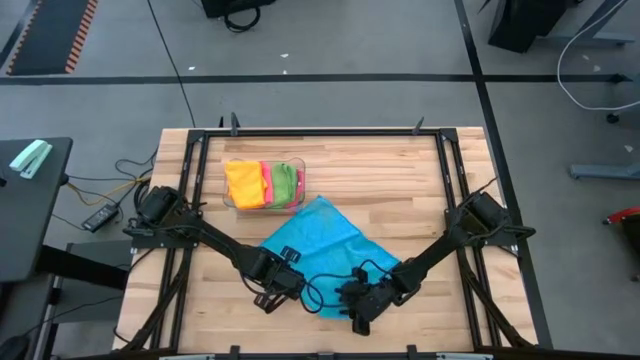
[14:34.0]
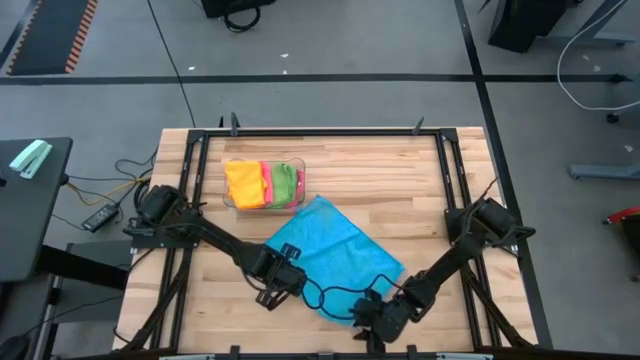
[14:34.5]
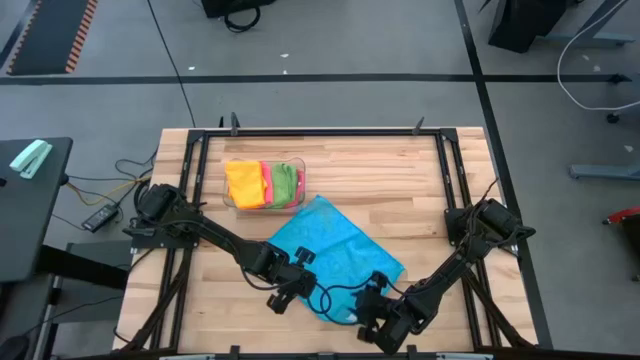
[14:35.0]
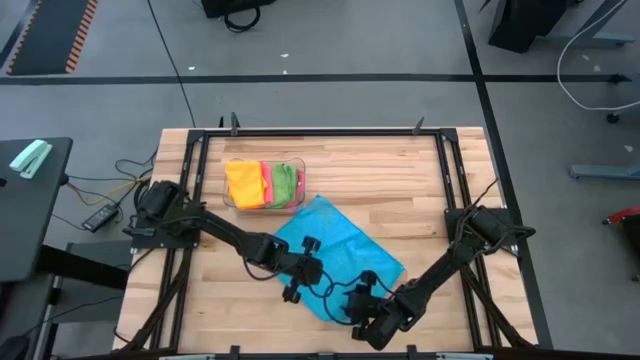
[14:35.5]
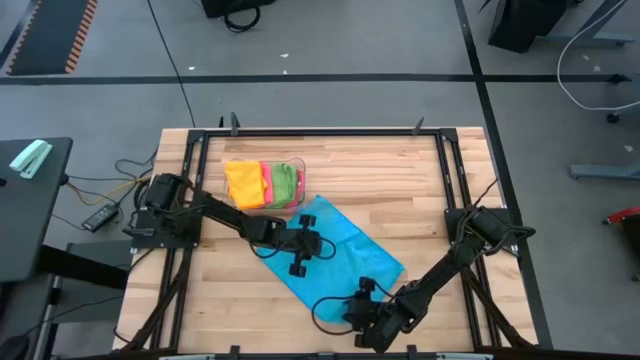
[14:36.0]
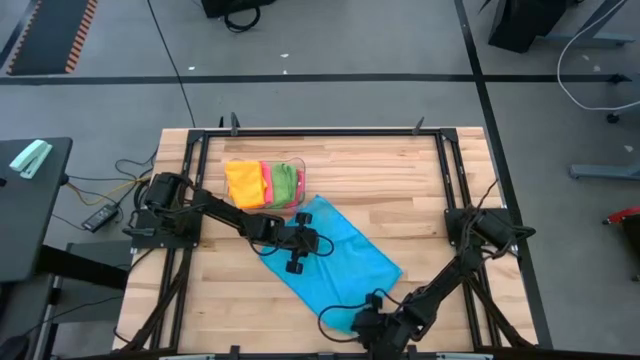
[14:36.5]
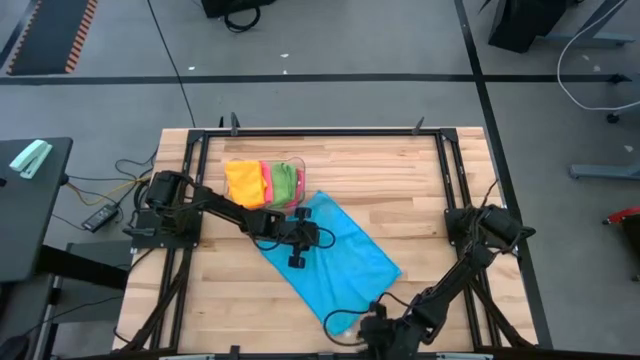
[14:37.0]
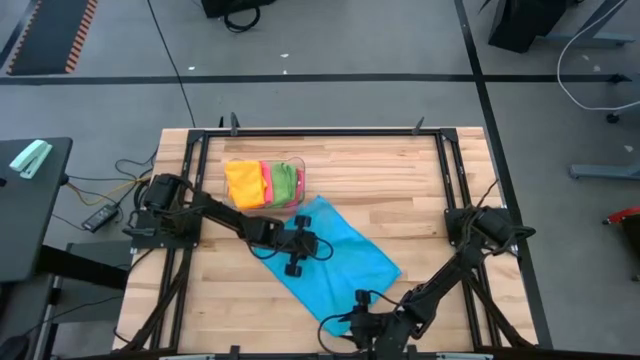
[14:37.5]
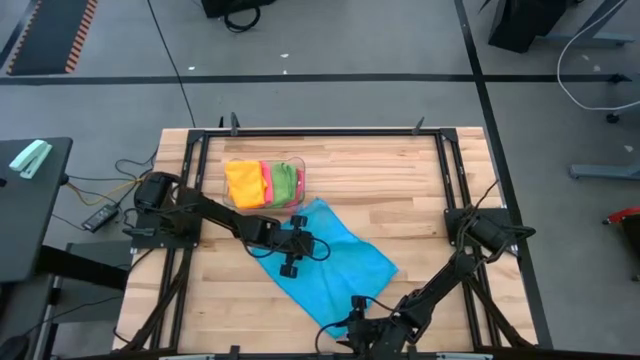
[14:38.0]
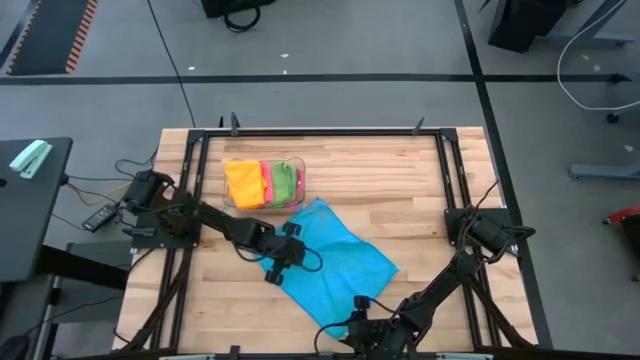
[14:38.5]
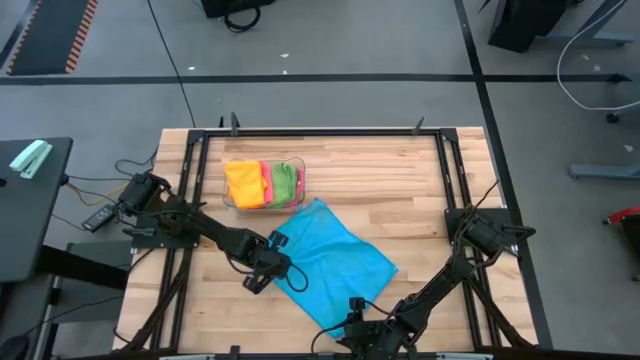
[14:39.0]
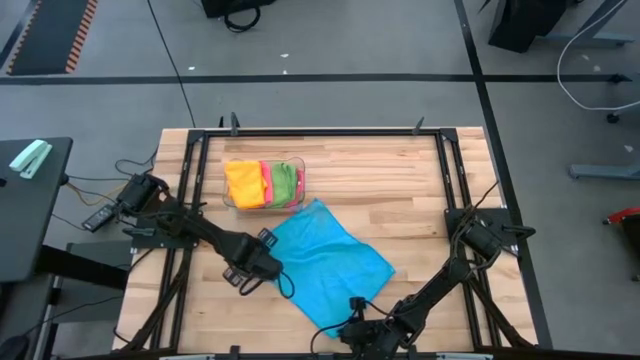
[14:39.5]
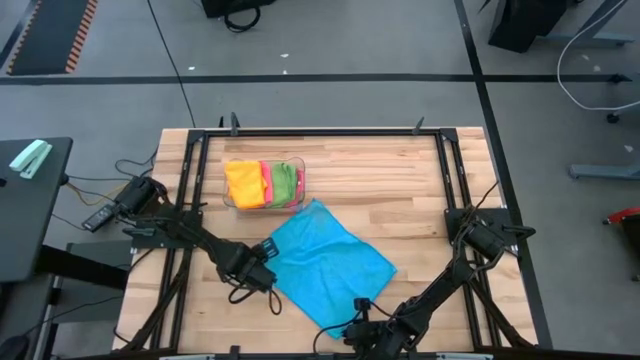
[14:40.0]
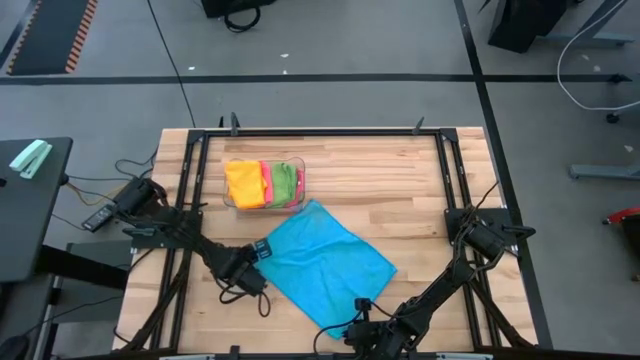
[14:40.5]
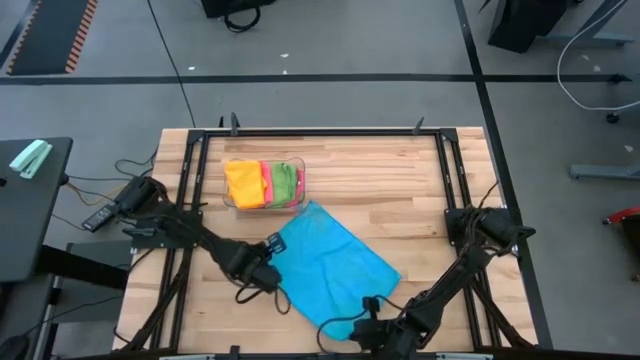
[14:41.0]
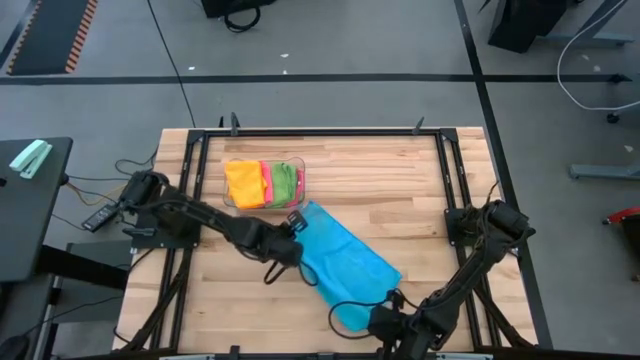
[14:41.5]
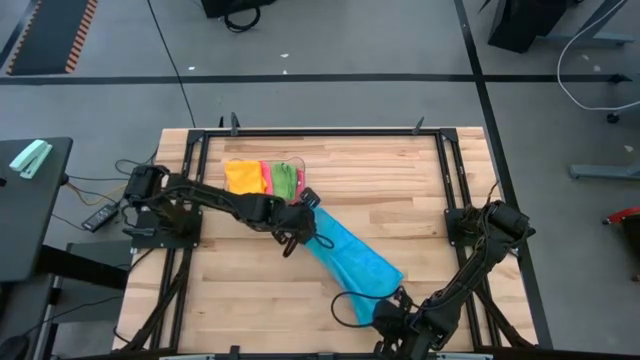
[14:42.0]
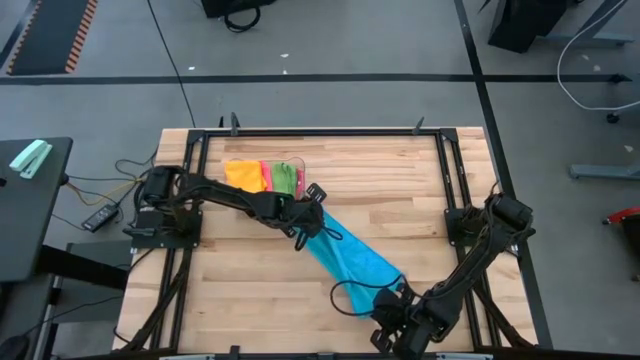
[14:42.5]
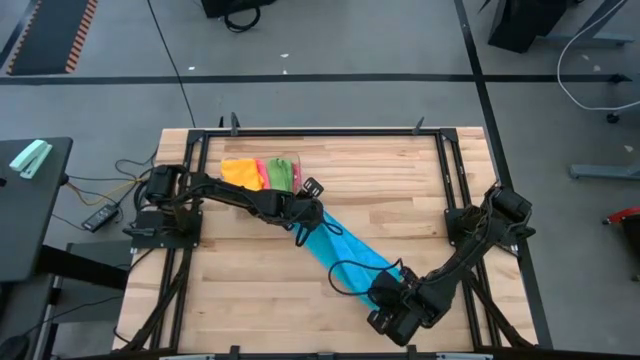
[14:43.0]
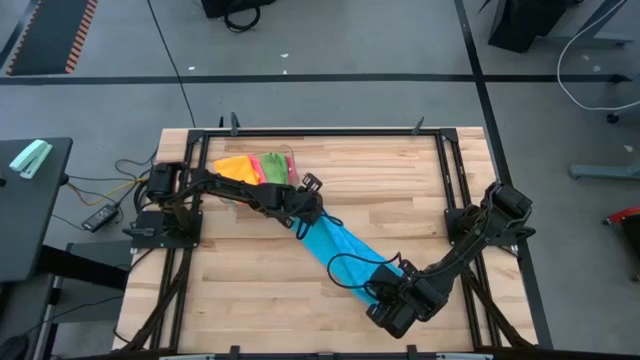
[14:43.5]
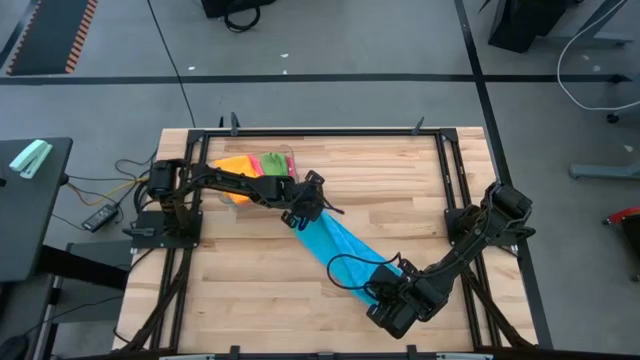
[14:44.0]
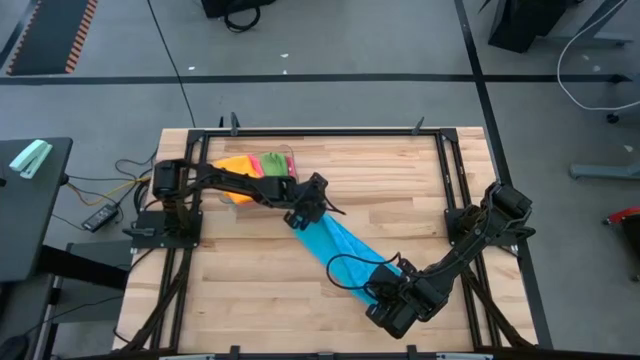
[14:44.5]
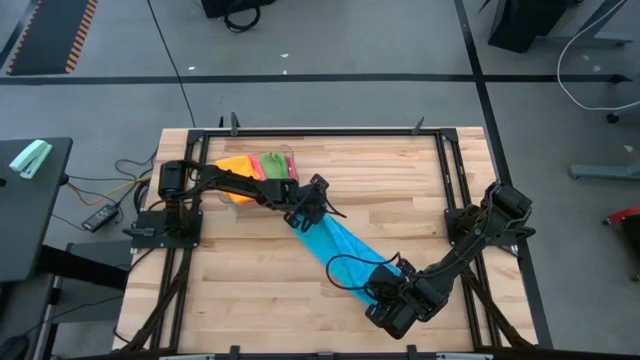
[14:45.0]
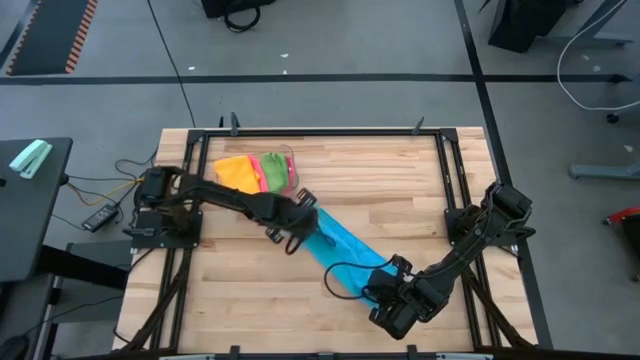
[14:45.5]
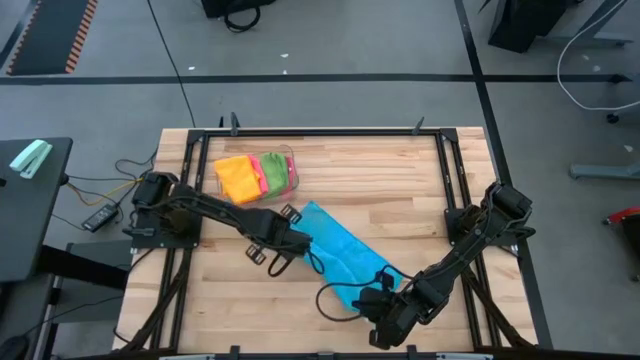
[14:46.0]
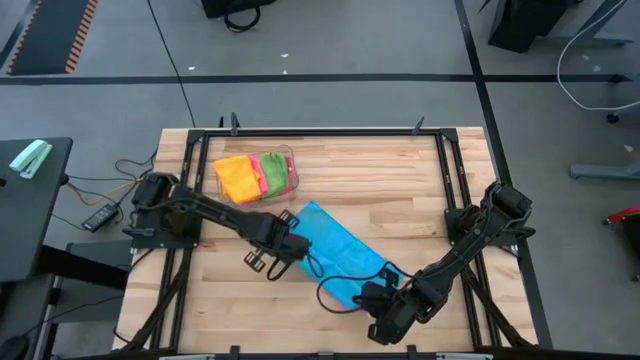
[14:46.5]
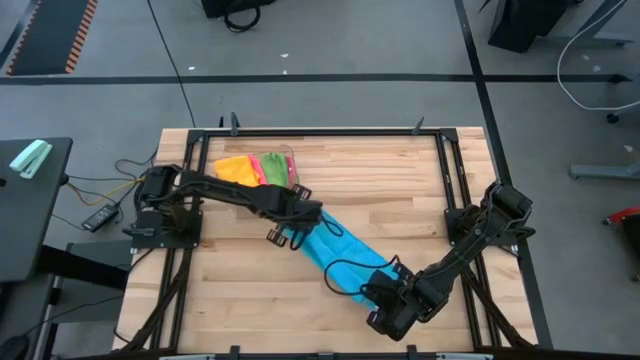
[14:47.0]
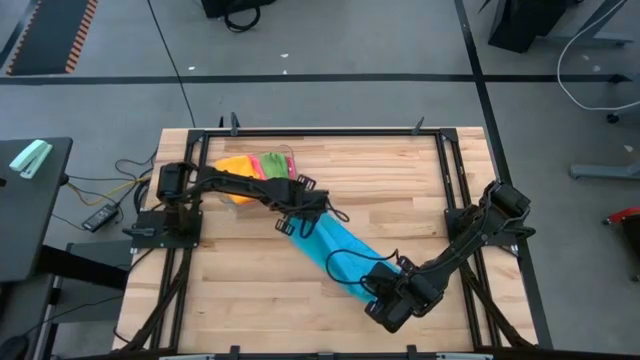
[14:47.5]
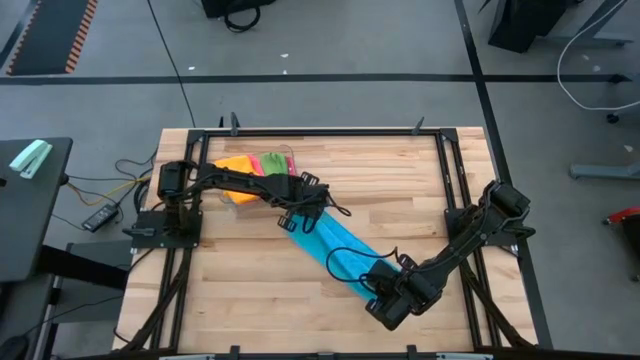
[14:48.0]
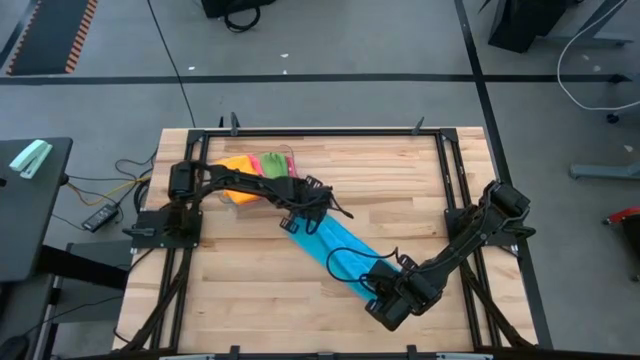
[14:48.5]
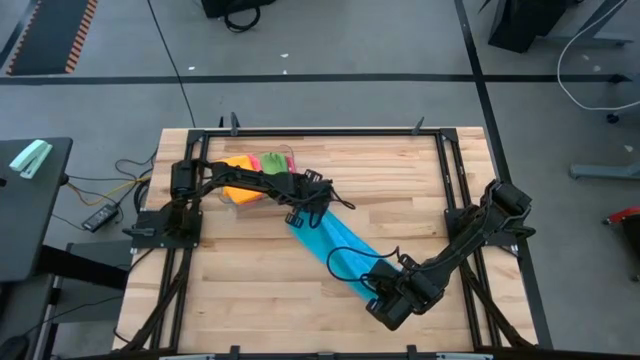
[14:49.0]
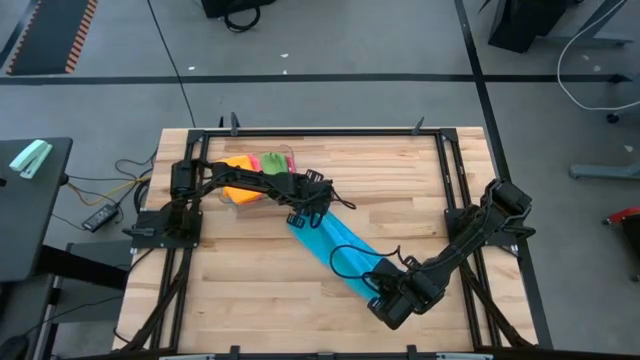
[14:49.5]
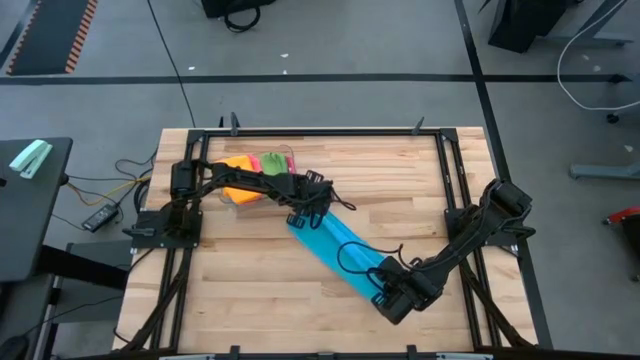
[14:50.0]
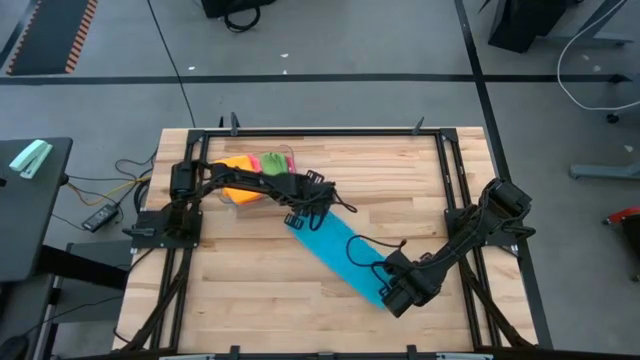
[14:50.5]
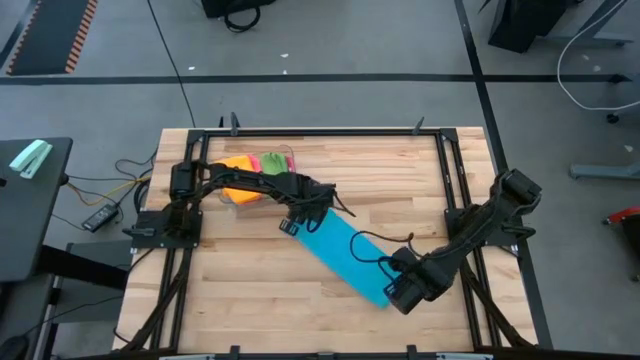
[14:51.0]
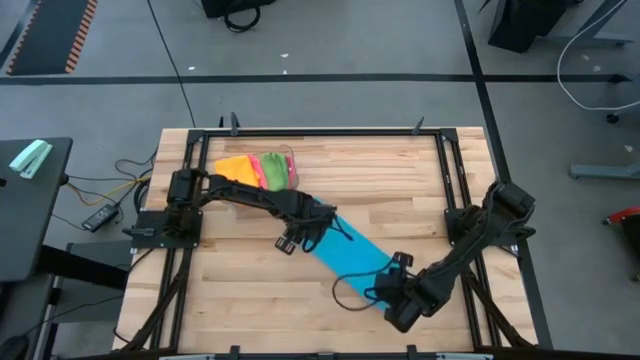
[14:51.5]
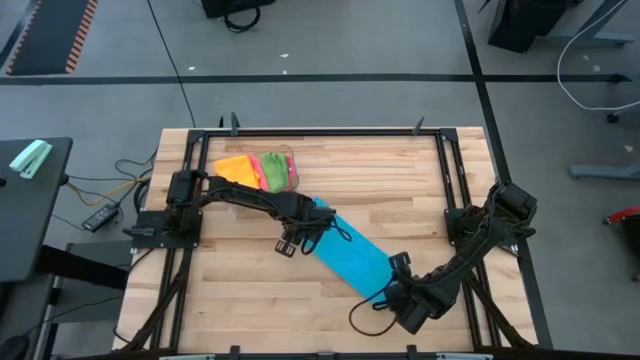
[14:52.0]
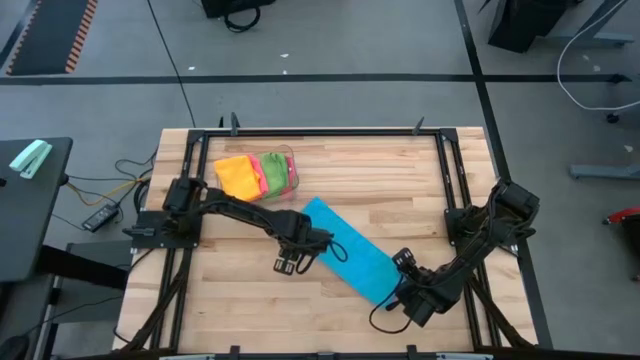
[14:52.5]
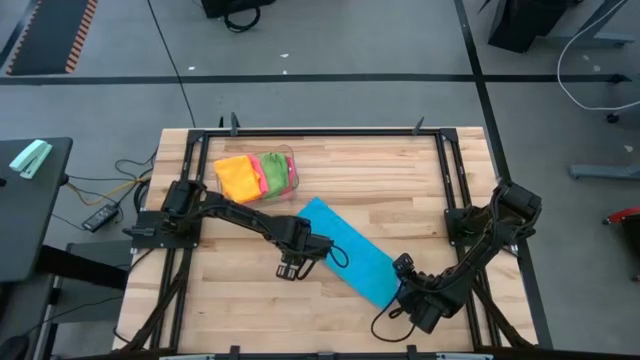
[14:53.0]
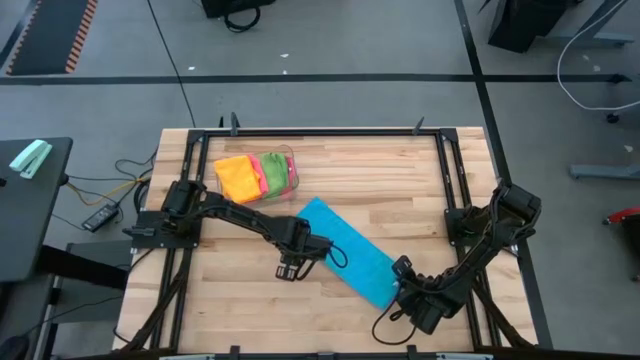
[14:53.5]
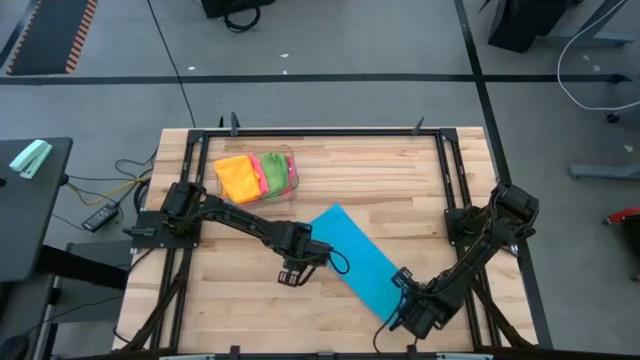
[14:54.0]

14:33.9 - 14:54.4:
Task: Fold microfiber towels
Fold the blue microfiber towel
